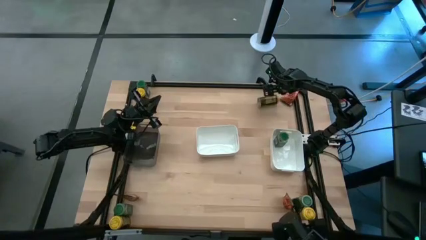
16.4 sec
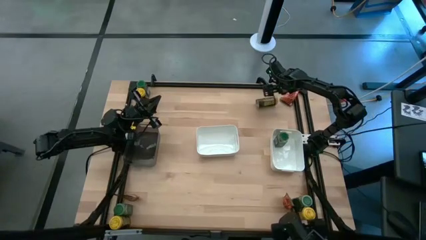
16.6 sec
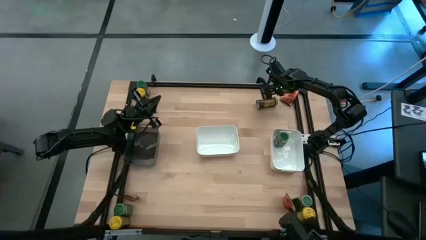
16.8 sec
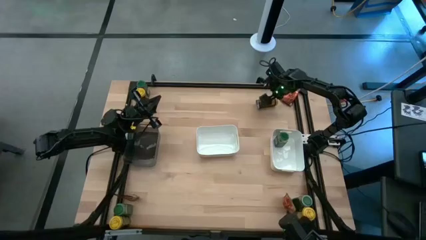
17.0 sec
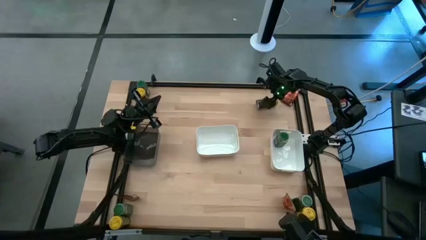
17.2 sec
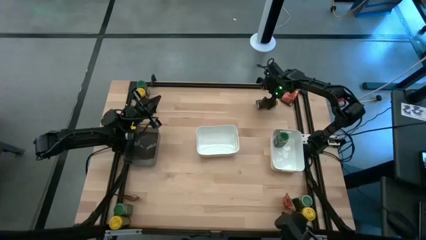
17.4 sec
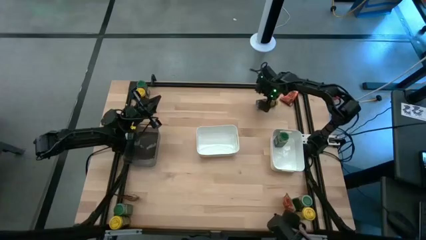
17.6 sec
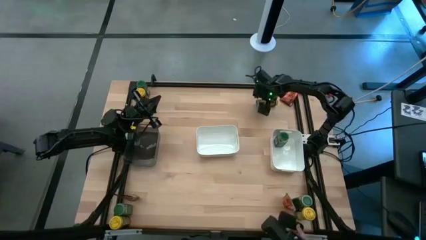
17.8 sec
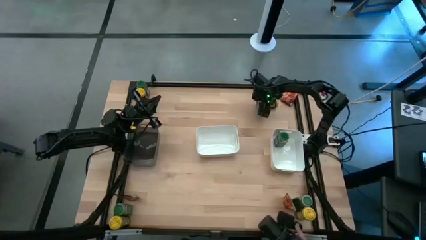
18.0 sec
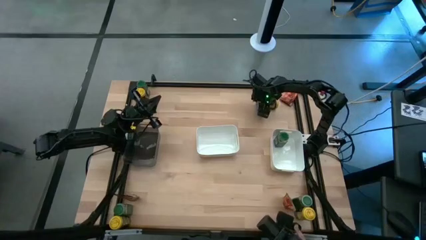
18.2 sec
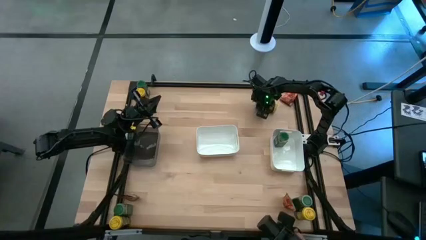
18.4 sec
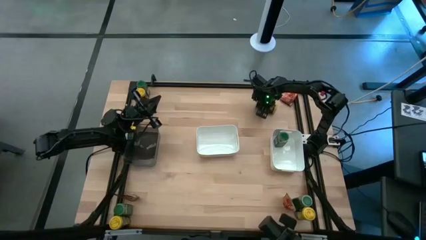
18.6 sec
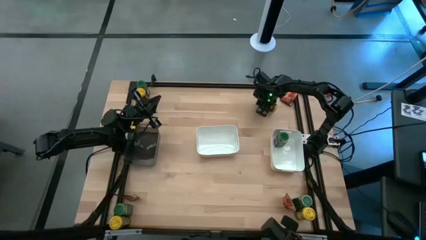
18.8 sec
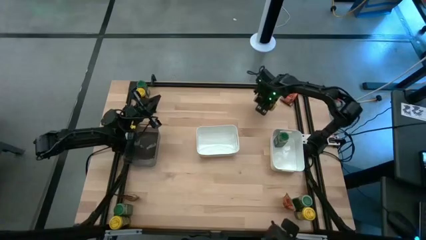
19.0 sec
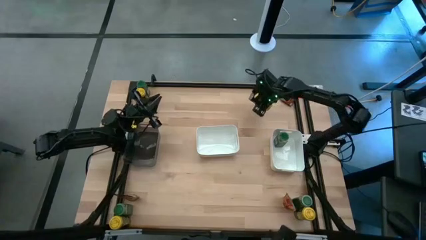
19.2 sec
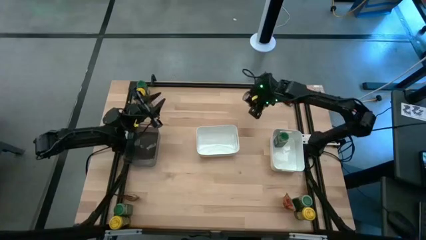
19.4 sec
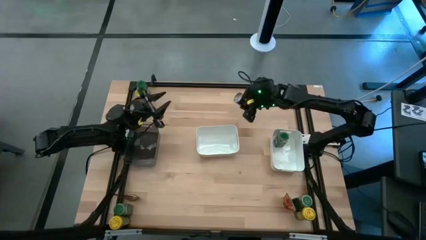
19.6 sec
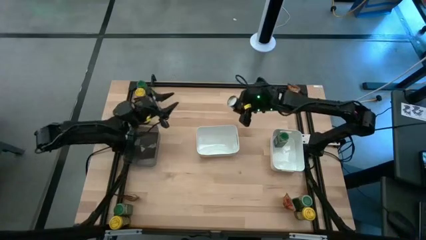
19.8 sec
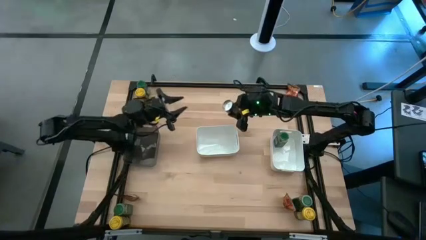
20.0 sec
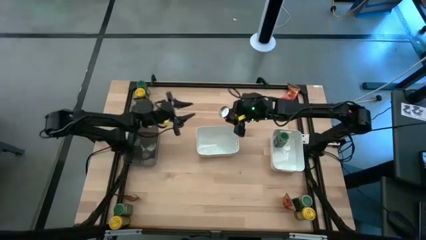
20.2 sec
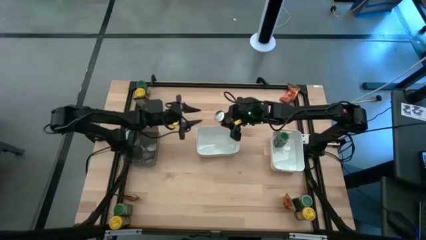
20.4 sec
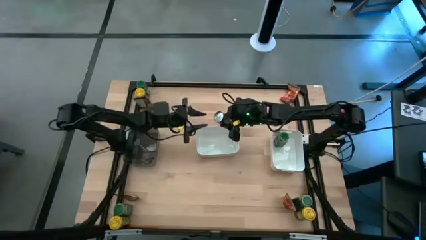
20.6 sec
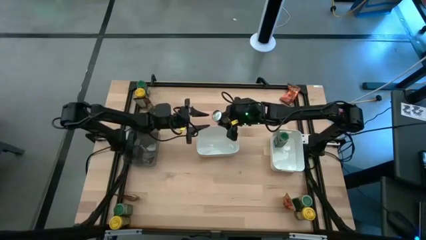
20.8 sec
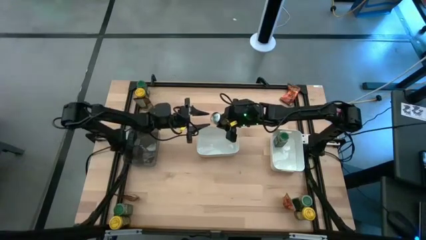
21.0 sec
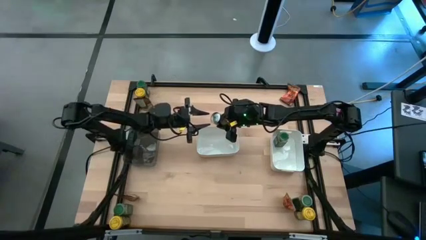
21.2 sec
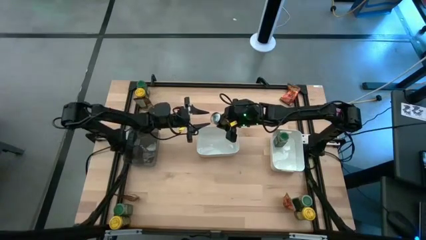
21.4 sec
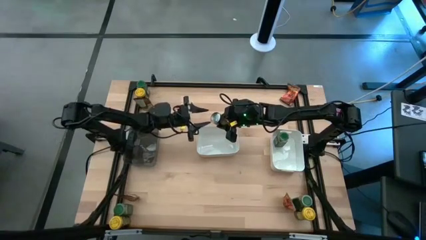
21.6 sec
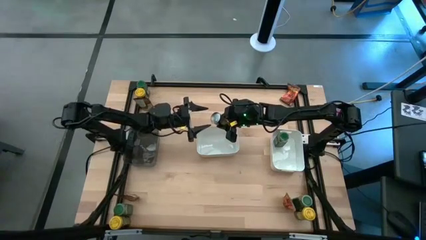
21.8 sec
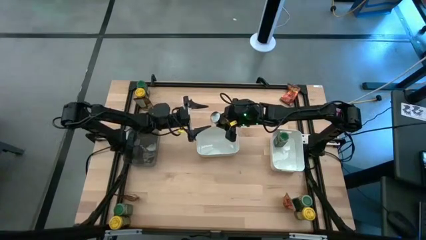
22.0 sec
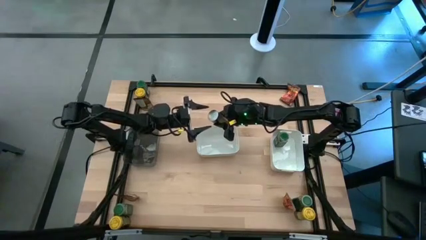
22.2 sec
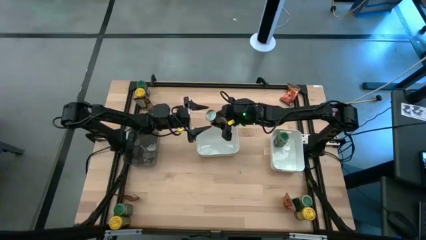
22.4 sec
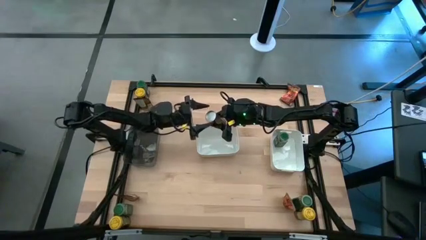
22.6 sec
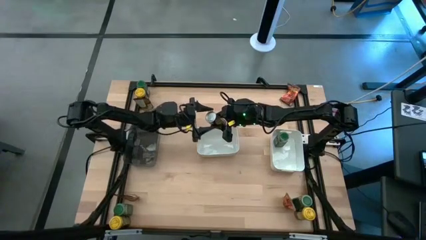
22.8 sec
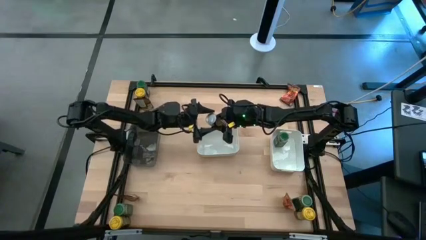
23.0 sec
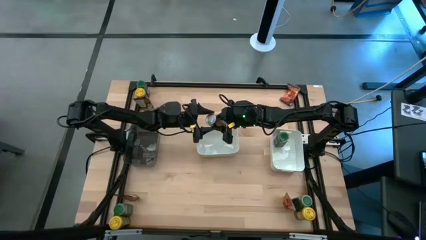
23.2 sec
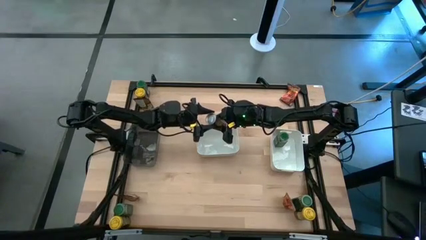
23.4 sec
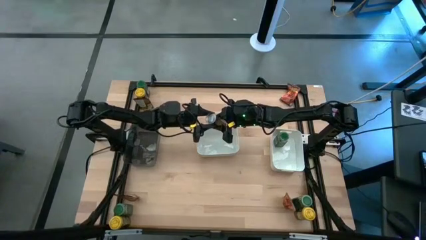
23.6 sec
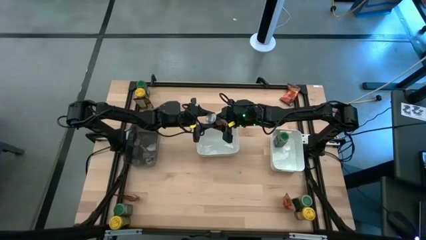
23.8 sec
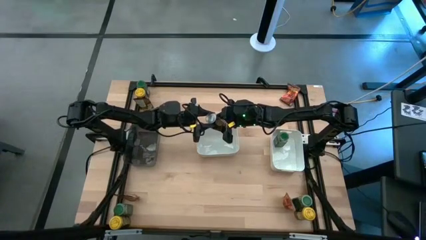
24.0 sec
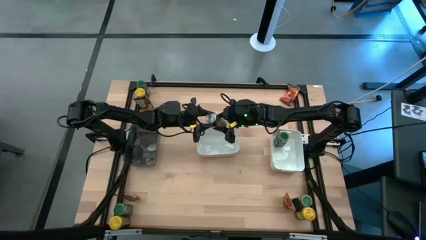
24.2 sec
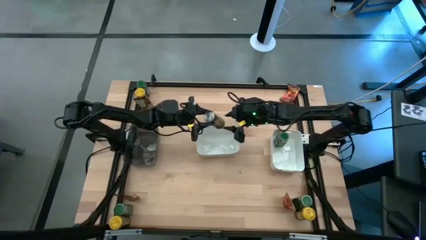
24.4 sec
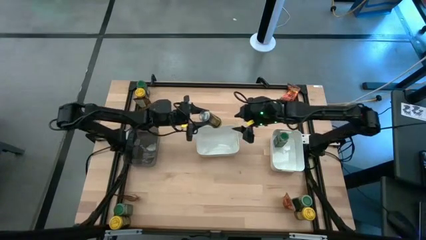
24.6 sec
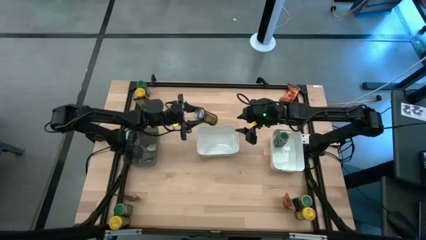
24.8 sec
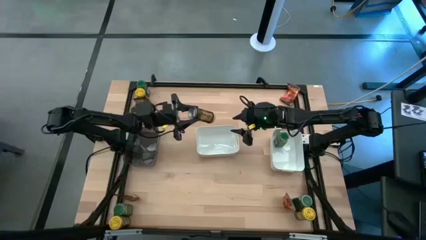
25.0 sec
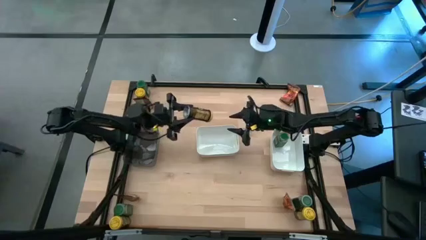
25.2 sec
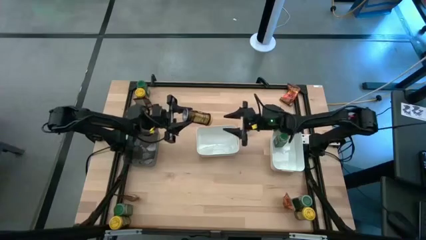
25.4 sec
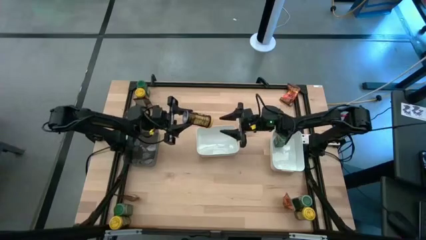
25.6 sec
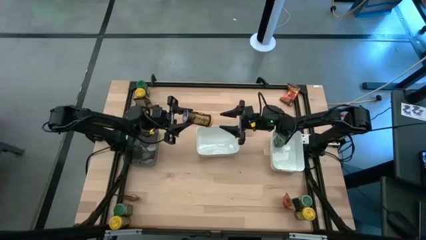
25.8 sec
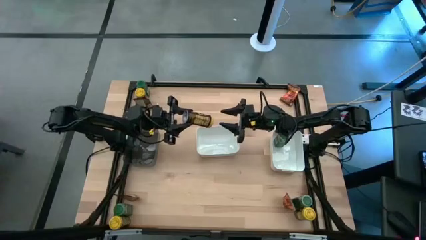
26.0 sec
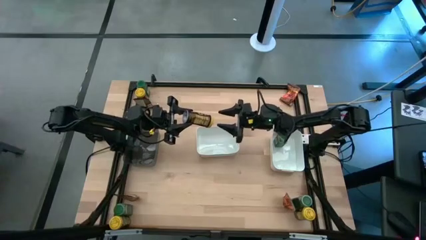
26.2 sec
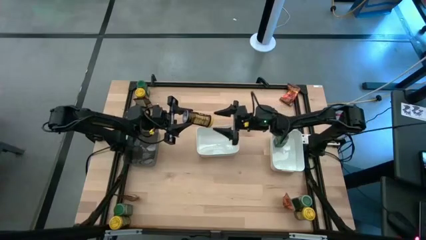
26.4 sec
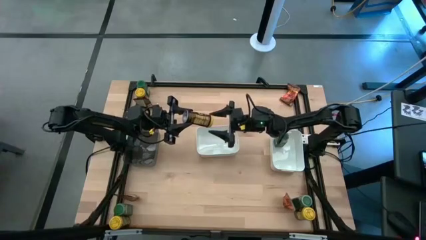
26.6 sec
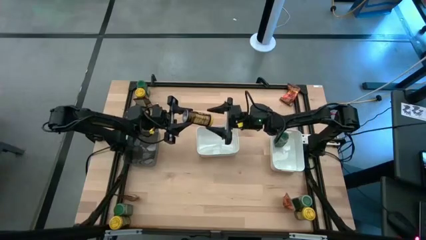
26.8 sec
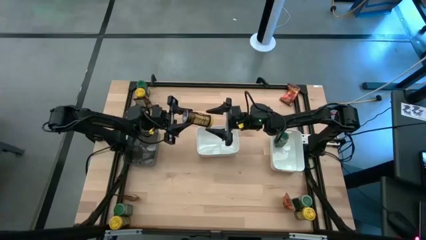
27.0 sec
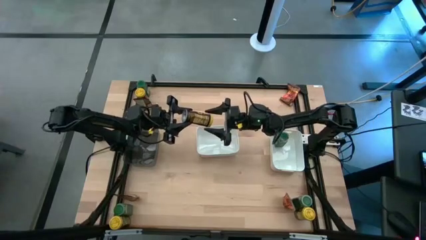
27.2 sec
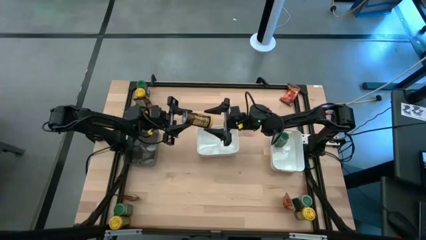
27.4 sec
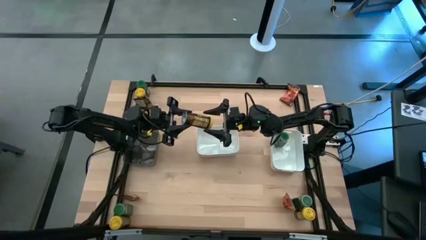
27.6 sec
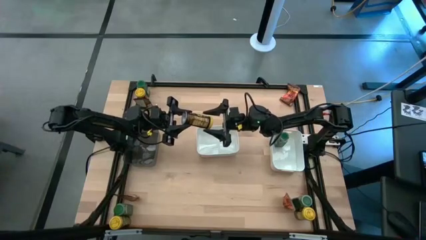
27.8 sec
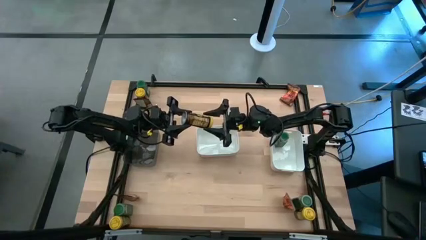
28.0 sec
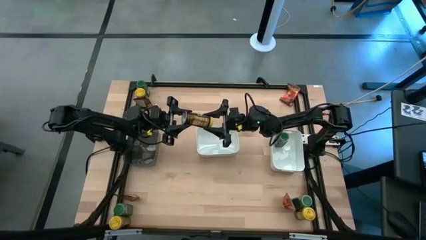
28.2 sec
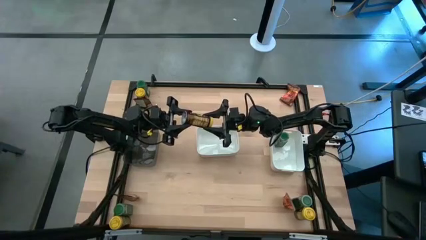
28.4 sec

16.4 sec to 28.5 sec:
Task: Sort spices by type
Put the top right yellow seasoning bottle into the left white bin
